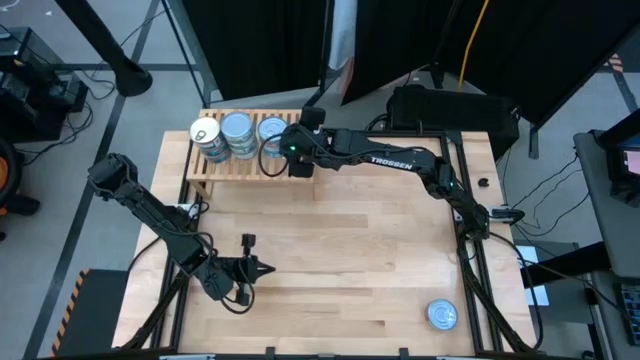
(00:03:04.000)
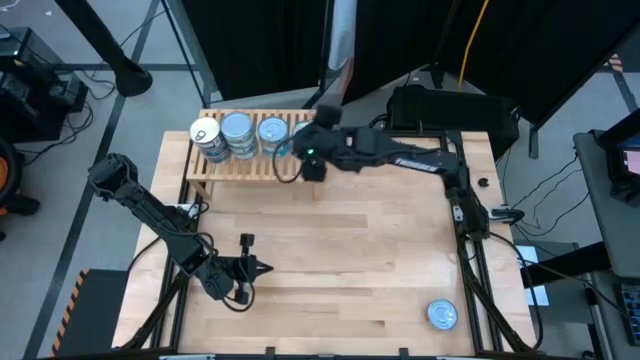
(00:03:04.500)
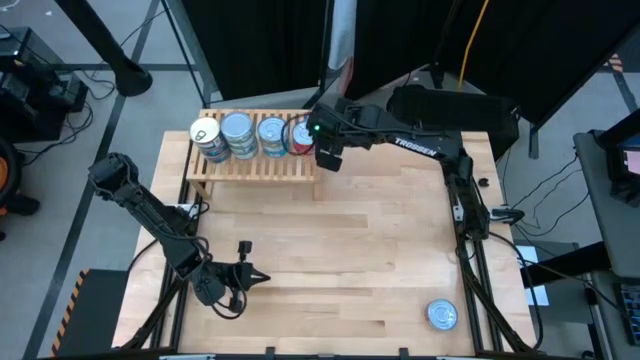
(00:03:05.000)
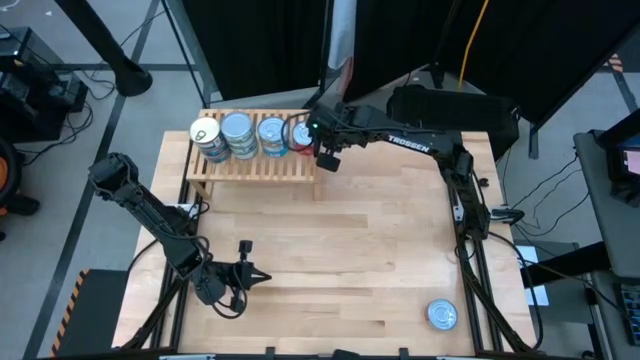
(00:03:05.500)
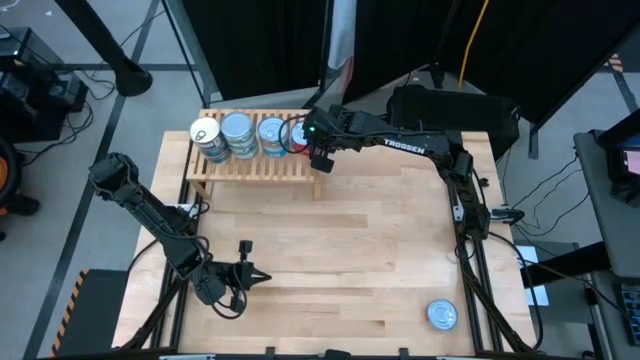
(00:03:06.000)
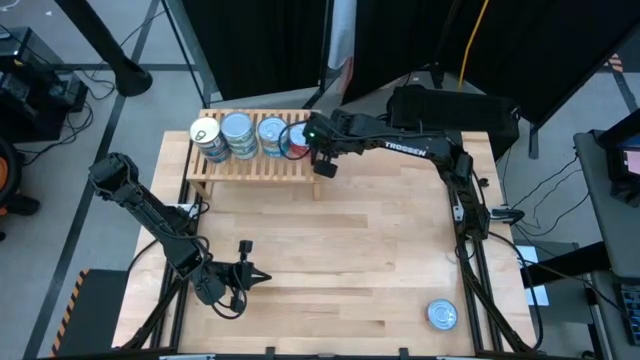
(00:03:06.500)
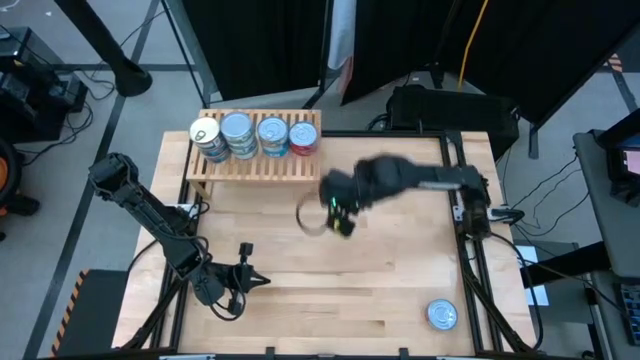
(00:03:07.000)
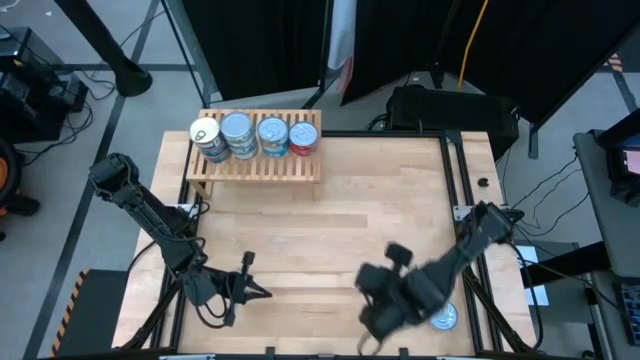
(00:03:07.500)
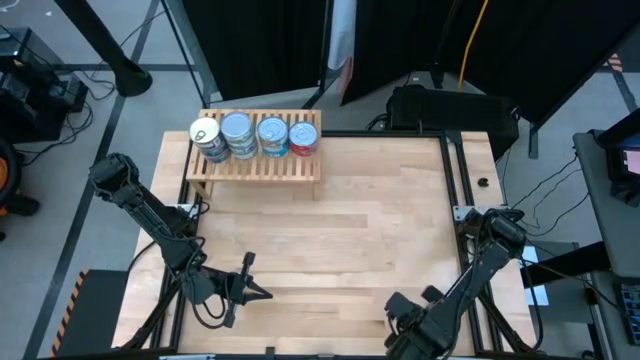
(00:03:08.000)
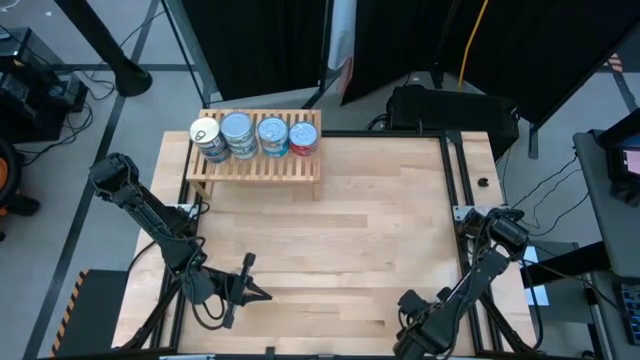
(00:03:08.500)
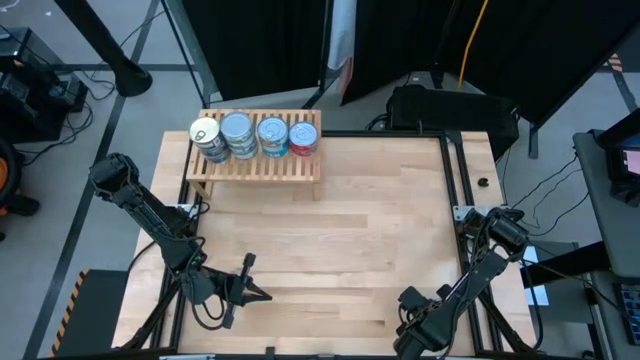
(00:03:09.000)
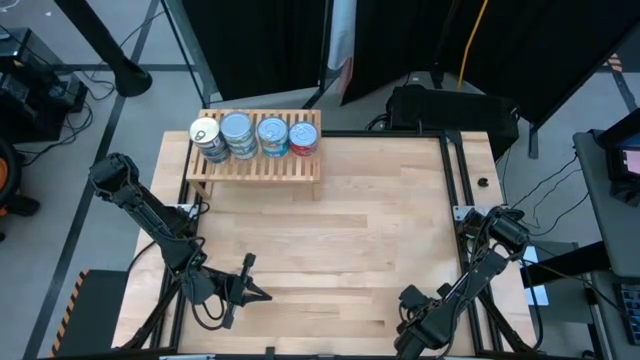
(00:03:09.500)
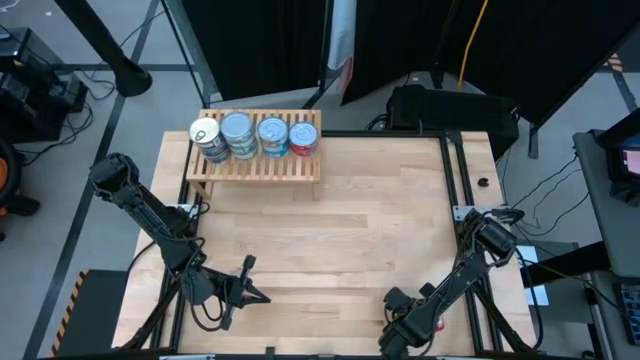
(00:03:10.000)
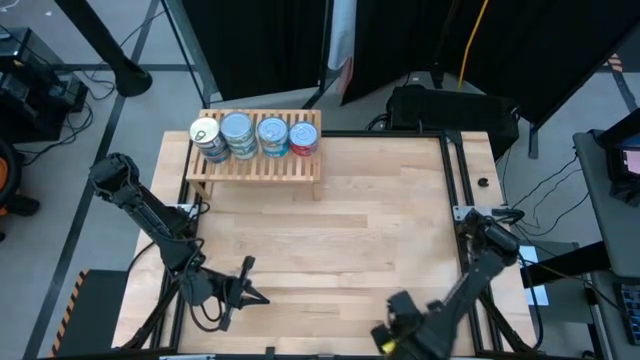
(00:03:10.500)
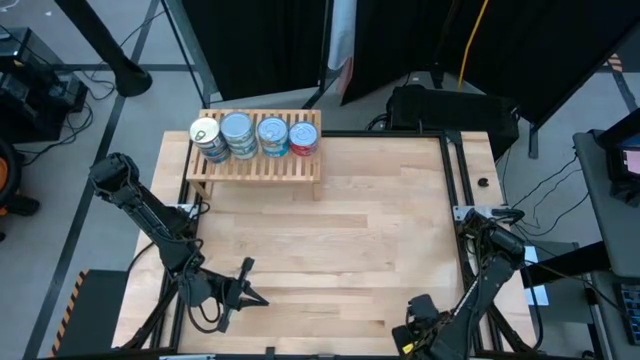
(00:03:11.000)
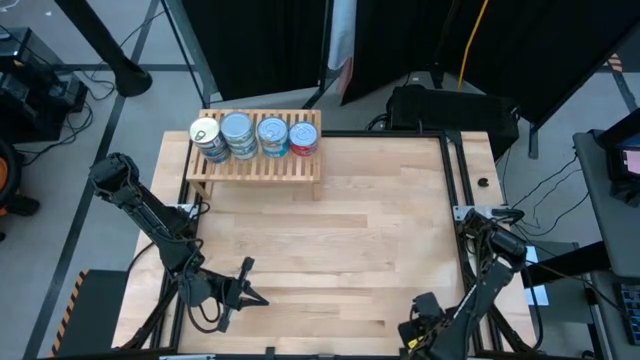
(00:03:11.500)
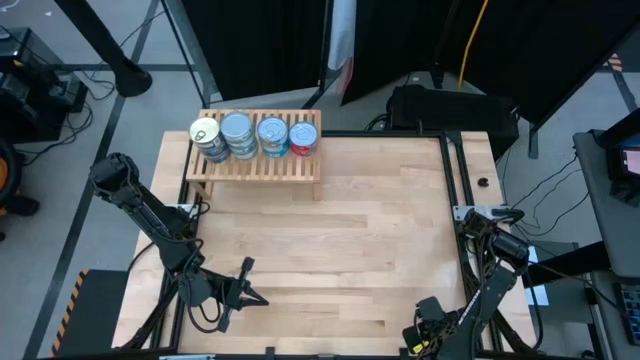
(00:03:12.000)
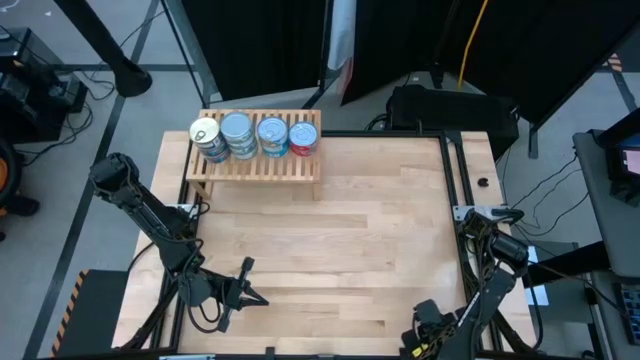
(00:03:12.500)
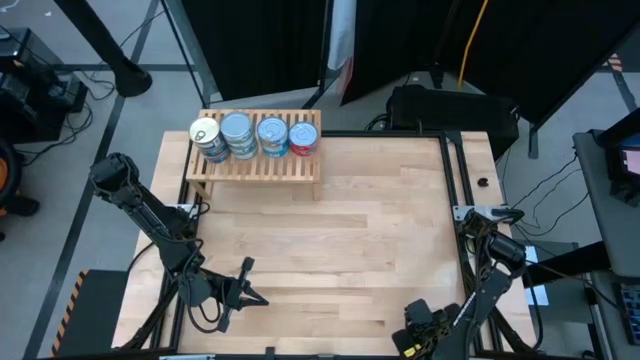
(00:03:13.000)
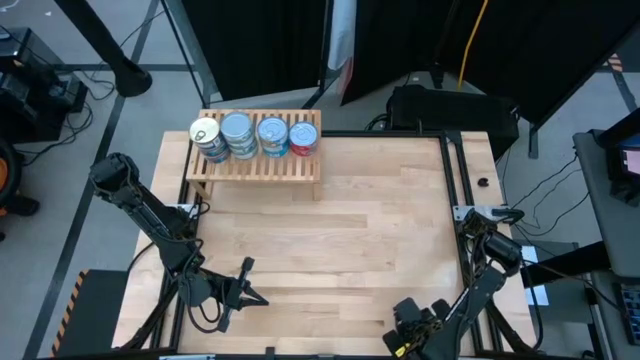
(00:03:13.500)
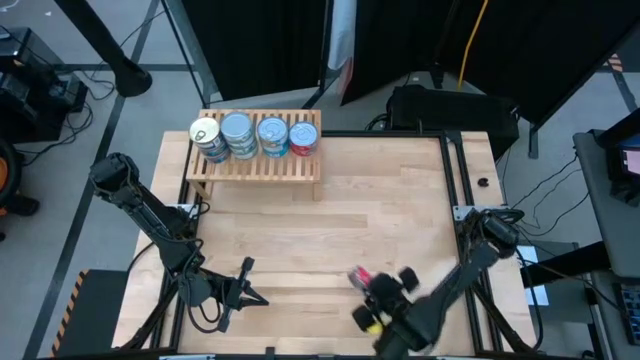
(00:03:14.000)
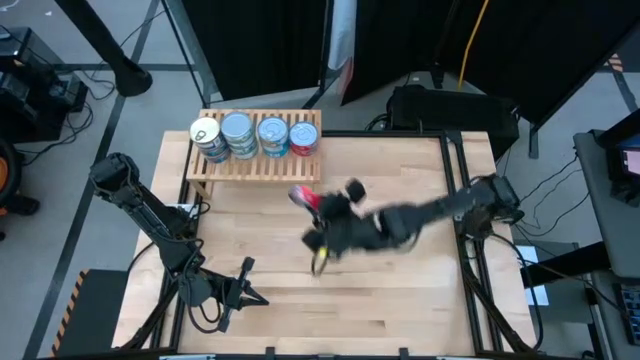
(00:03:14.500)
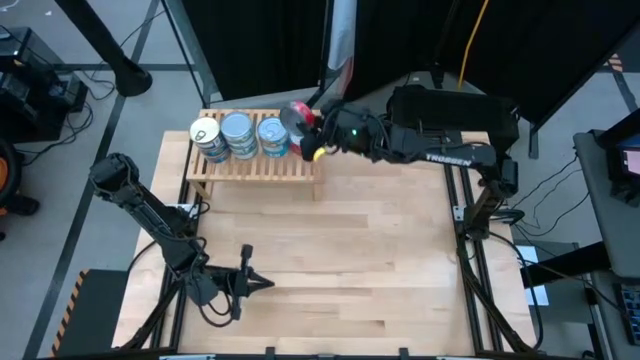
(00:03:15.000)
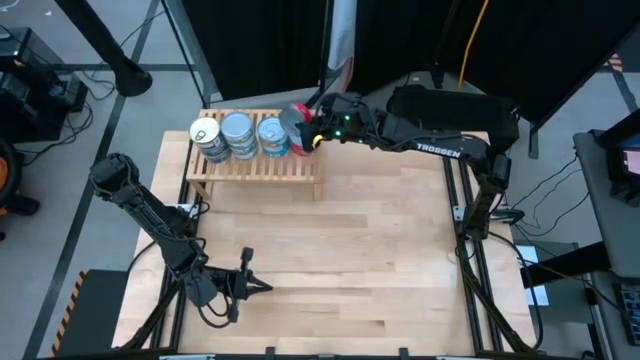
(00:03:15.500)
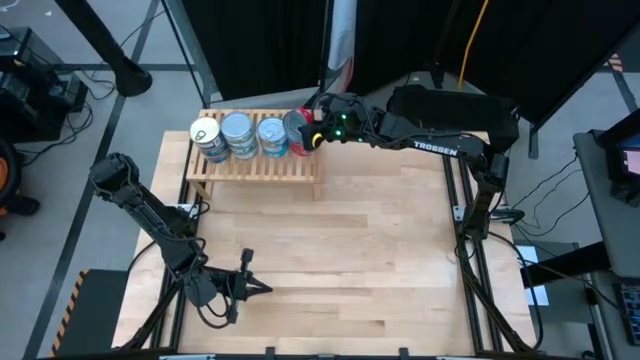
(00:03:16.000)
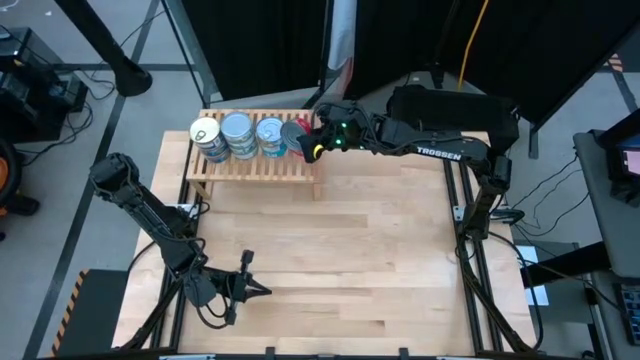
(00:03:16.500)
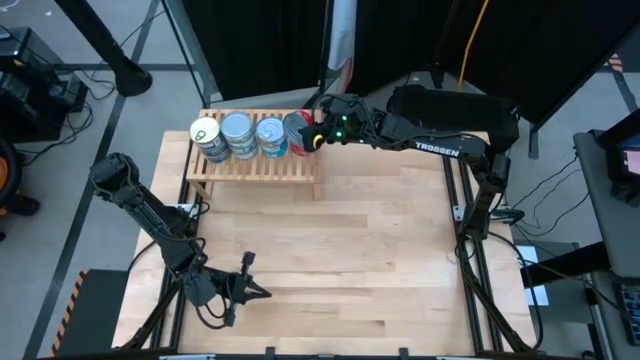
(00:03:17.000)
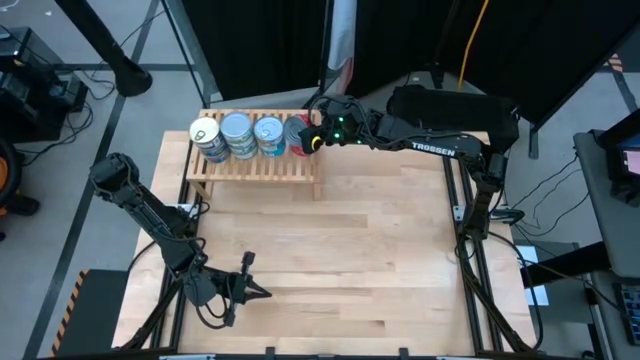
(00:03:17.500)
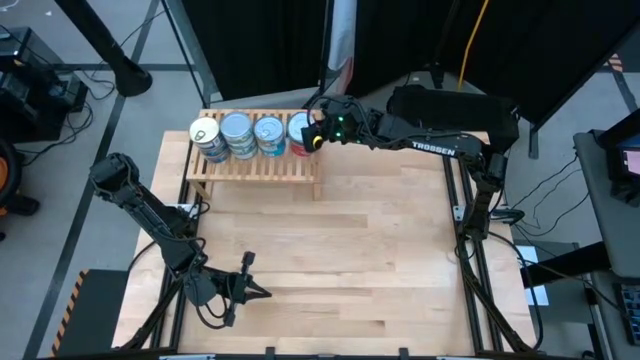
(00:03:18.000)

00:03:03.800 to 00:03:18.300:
Task: Stack canned seafood by type on shelf
Stack the red can on top of the other red can

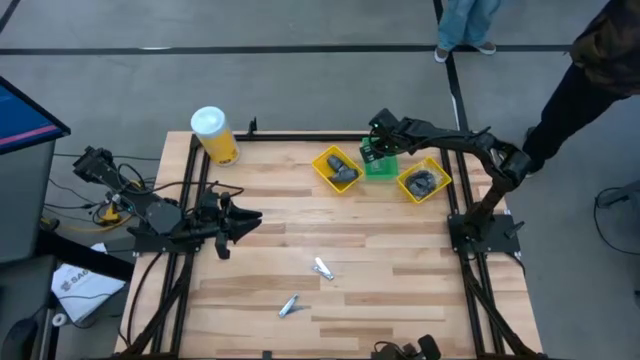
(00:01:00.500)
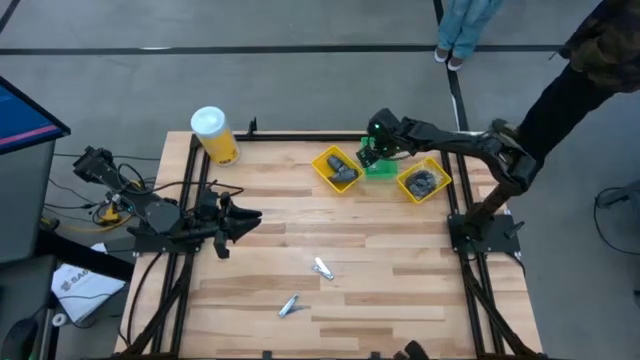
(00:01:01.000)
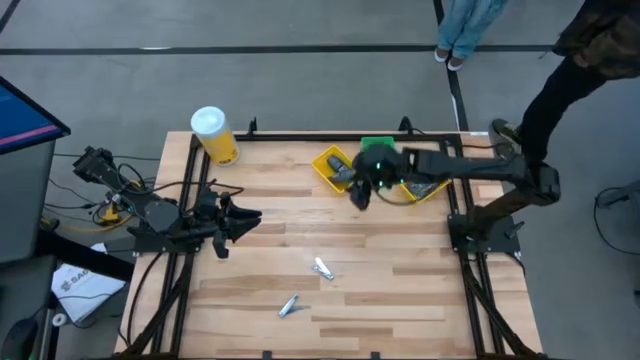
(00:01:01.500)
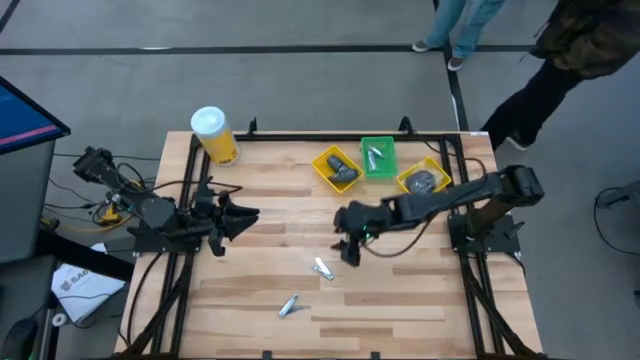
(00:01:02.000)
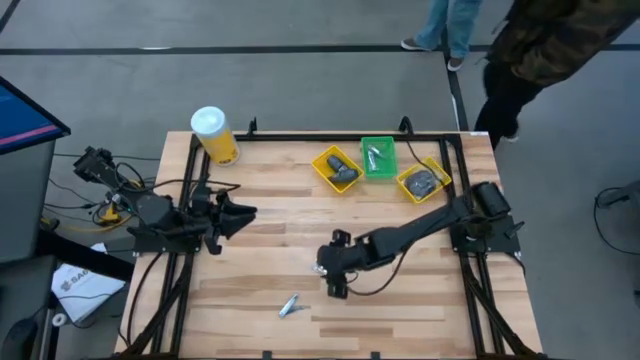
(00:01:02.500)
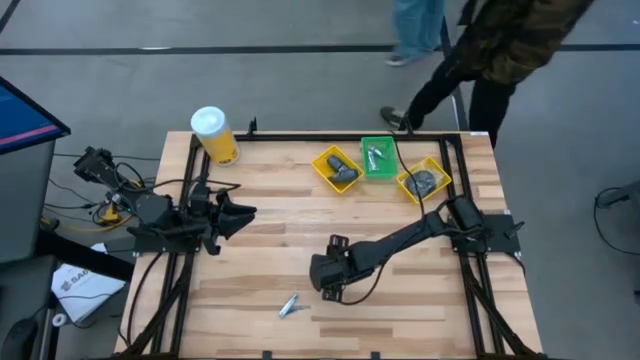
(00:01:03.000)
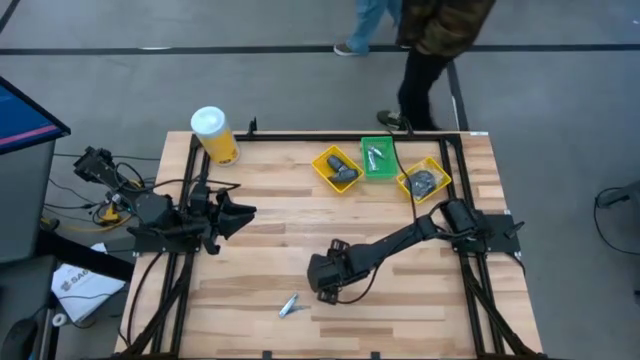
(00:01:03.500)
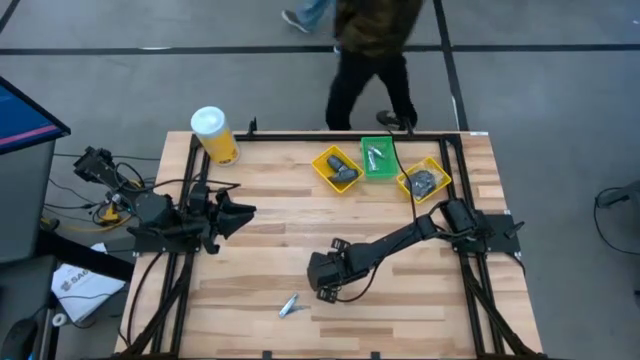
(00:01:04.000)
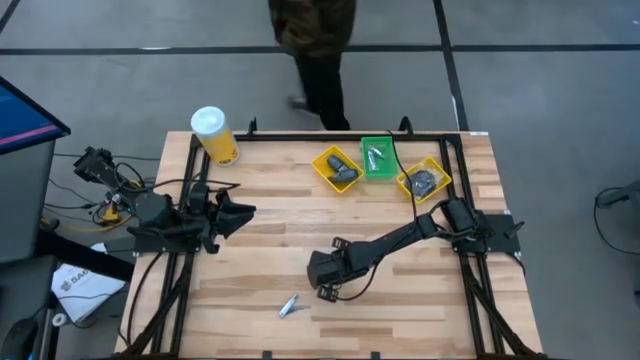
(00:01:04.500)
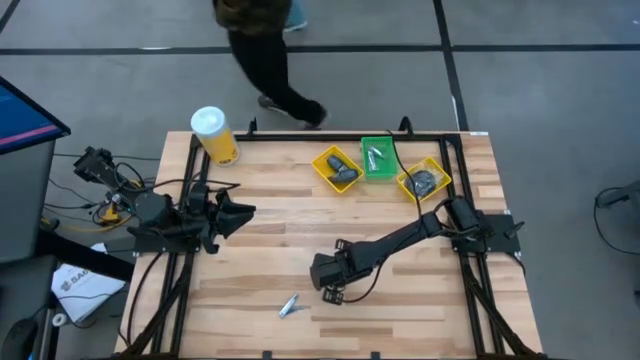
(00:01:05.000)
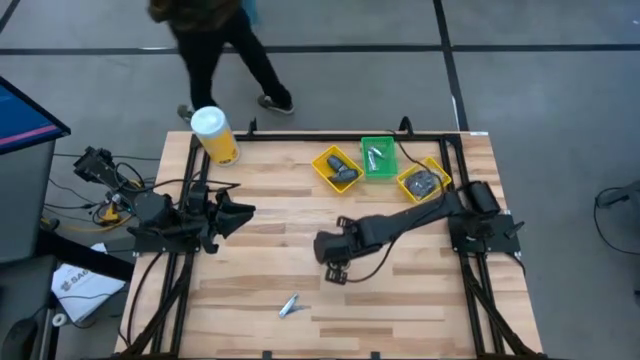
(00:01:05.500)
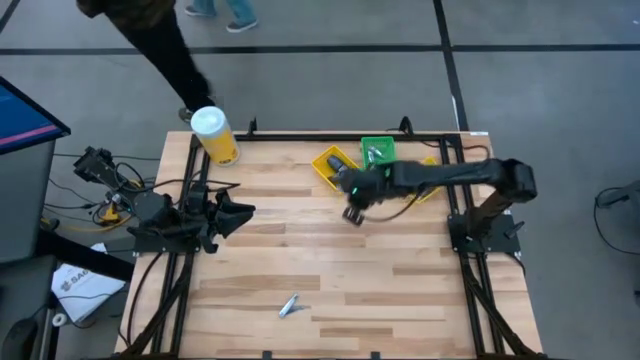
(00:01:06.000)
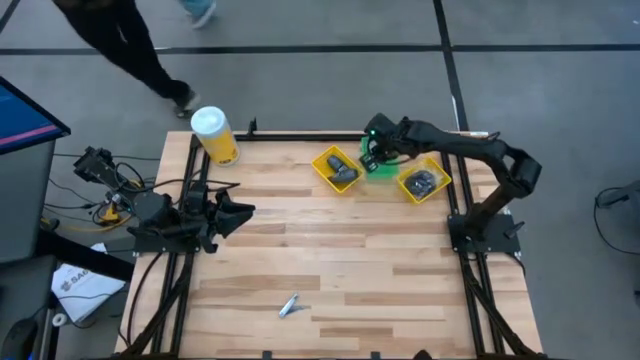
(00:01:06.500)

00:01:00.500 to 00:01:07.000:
Task: Pick & Place Travel size toiletries
Put the silver nail cutter into the green basket
